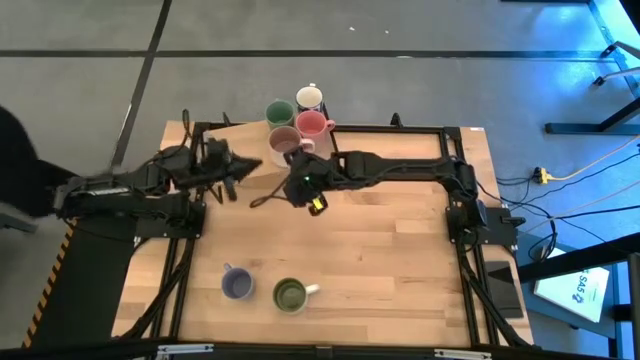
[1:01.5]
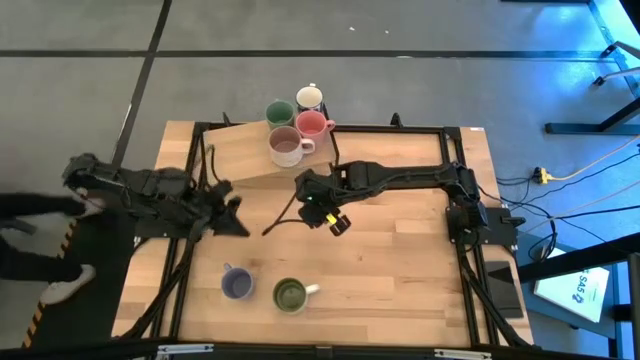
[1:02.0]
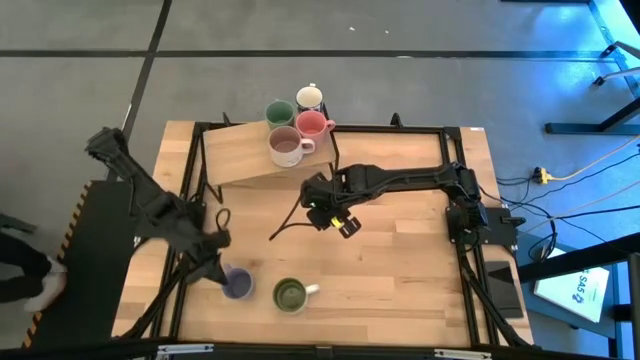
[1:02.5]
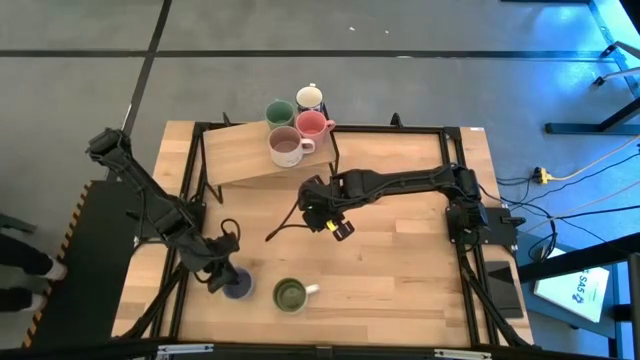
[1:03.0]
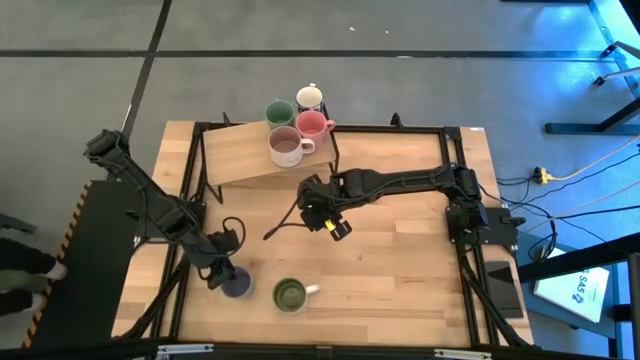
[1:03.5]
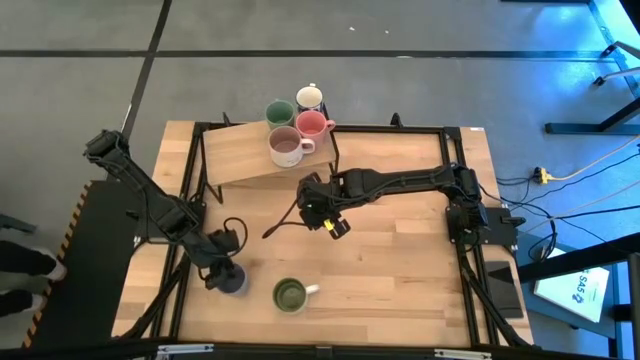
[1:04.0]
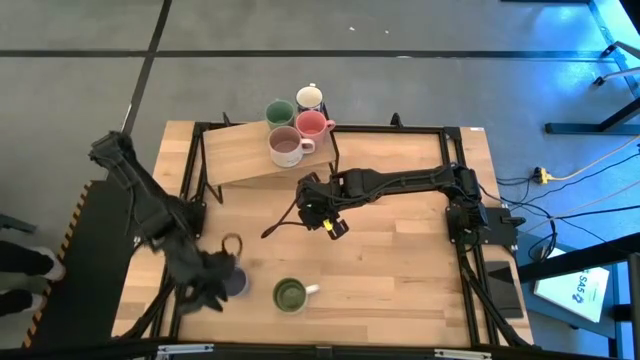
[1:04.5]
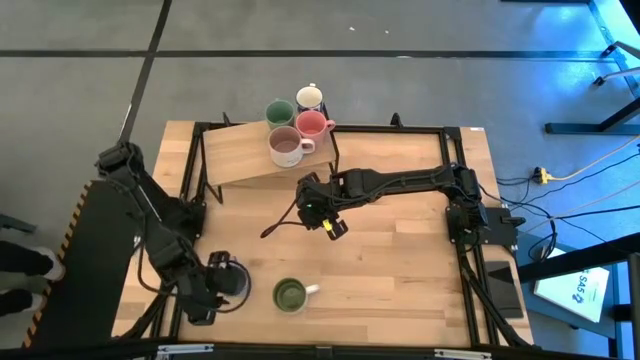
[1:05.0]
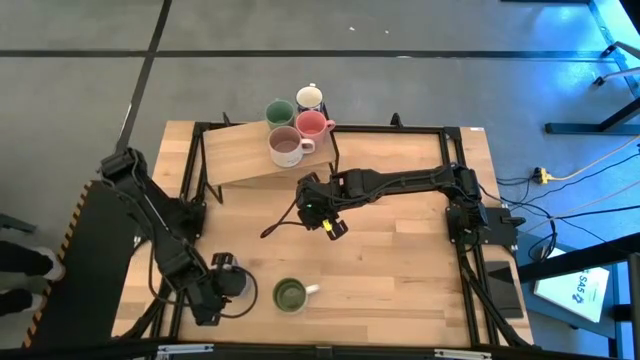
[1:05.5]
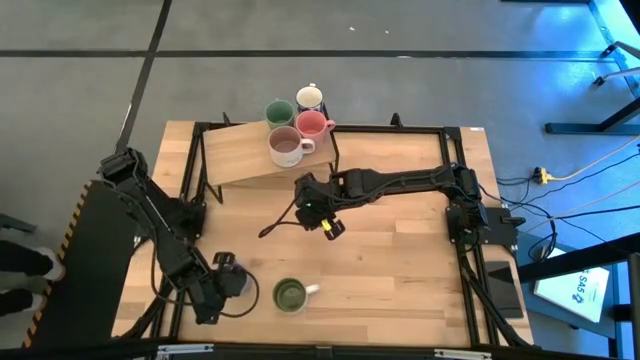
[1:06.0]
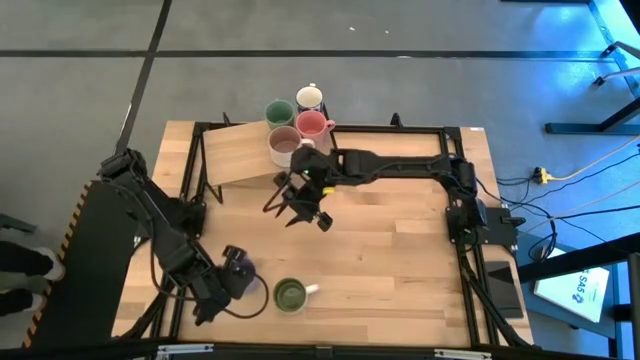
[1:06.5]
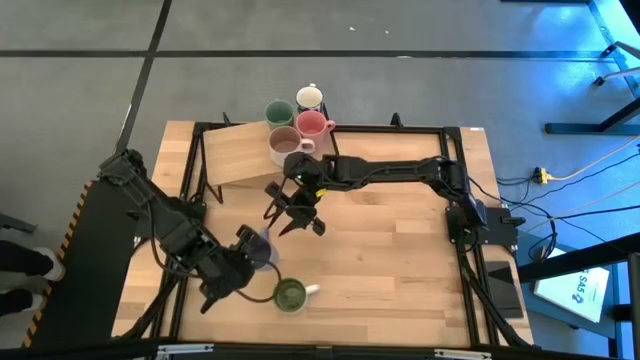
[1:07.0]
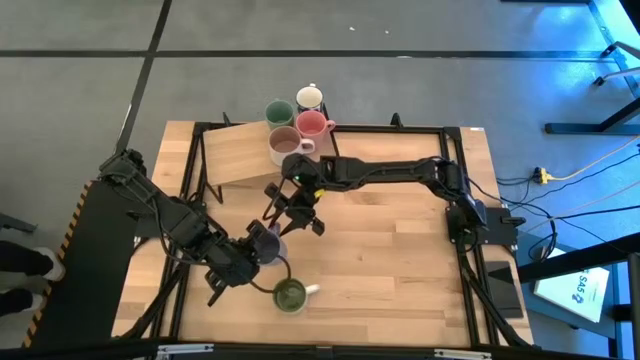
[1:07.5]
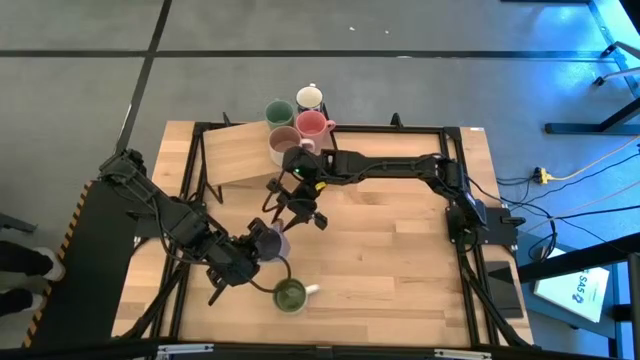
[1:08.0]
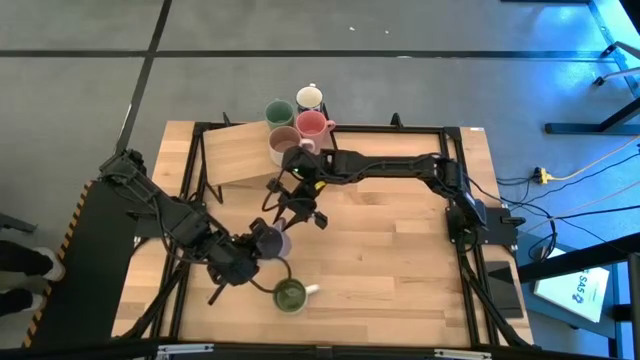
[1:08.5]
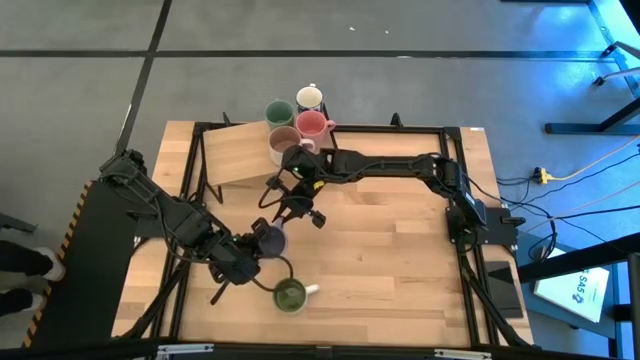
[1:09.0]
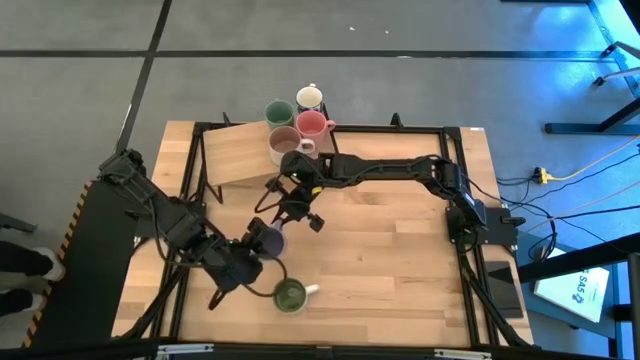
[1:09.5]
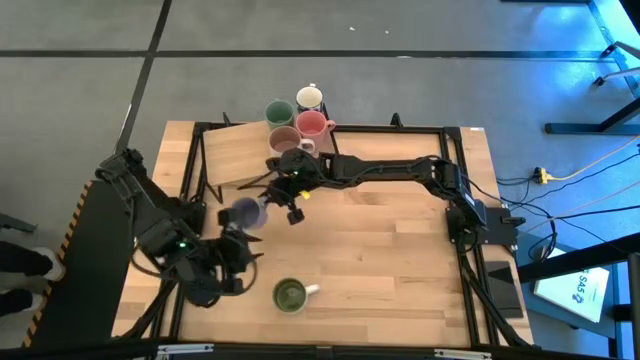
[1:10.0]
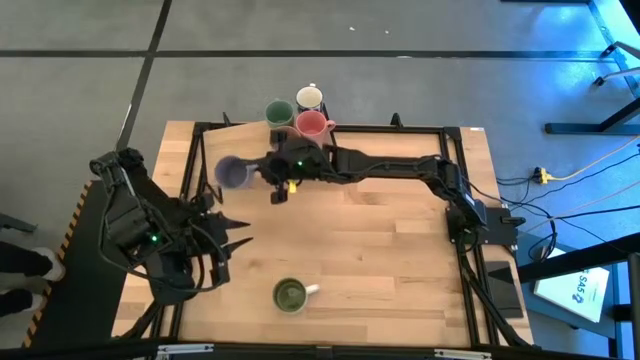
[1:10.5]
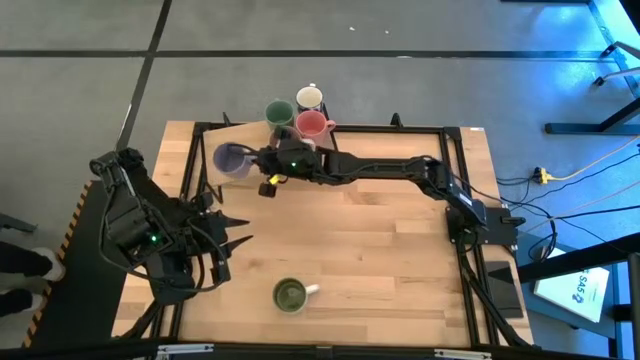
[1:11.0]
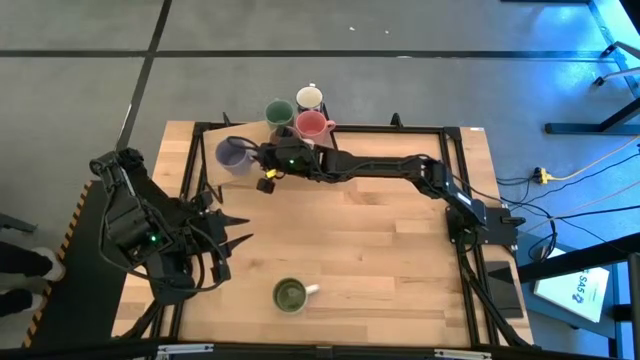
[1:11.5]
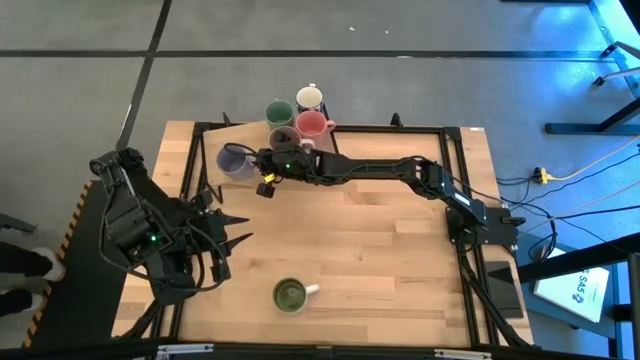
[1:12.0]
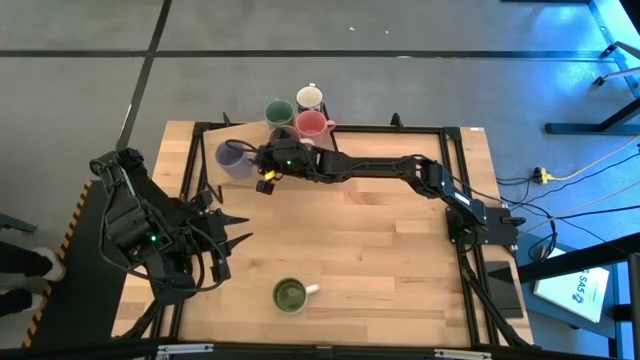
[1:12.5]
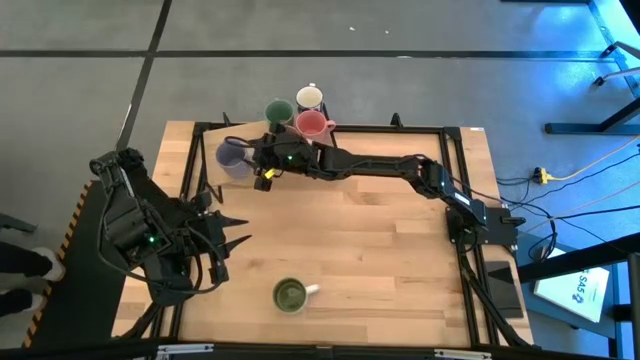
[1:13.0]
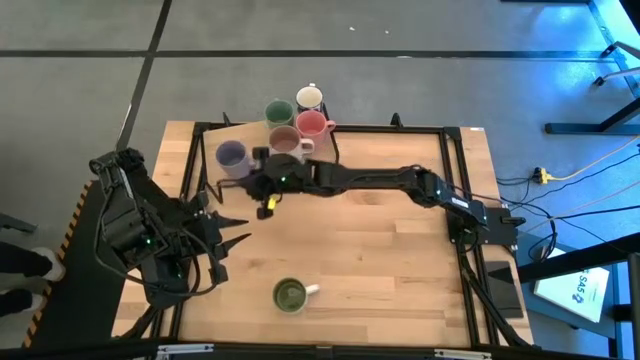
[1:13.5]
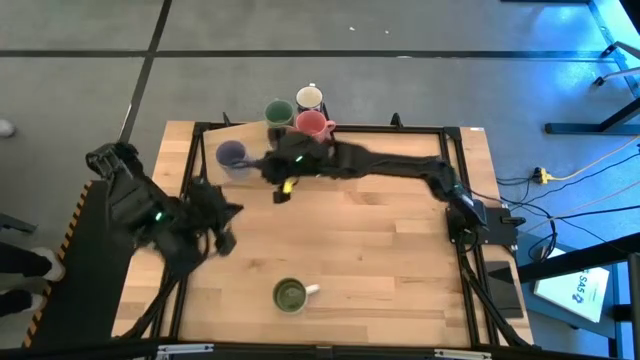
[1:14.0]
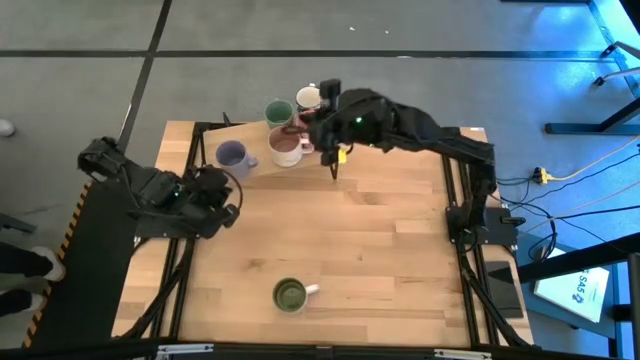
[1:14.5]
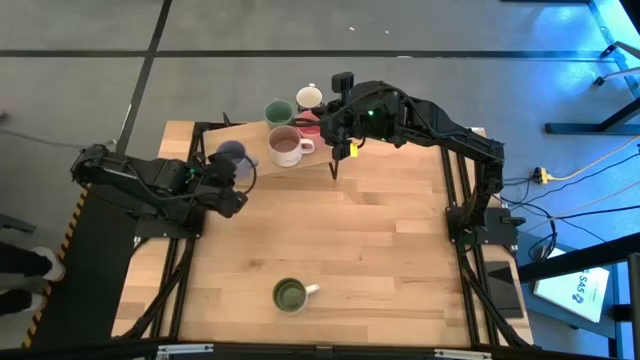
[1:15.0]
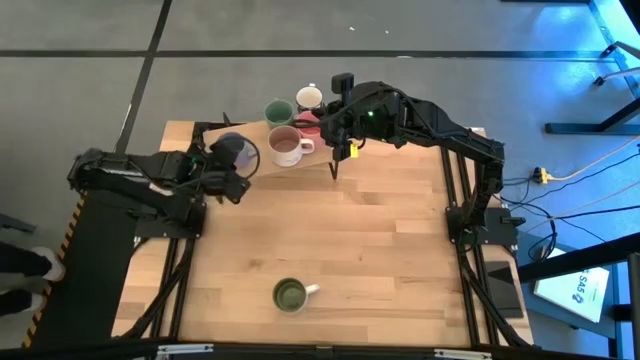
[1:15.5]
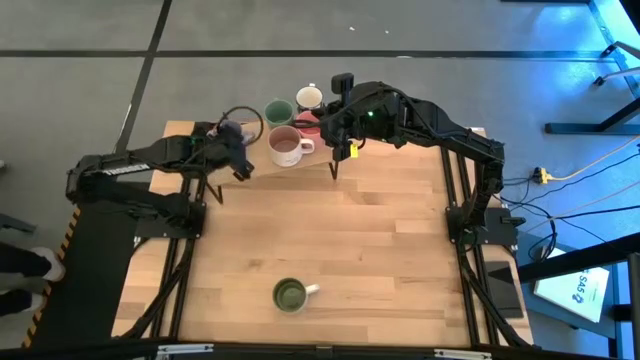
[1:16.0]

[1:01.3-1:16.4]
Task: Place coffee mugs
Put the light purple mug on the shelf

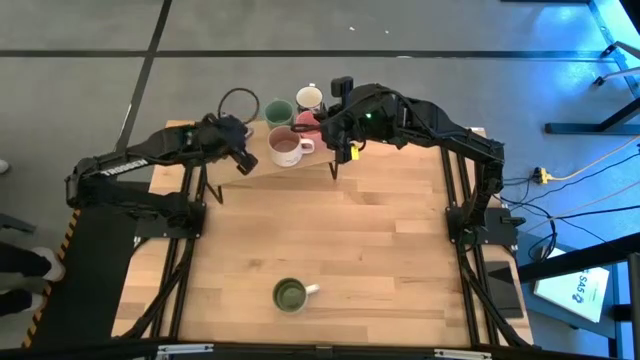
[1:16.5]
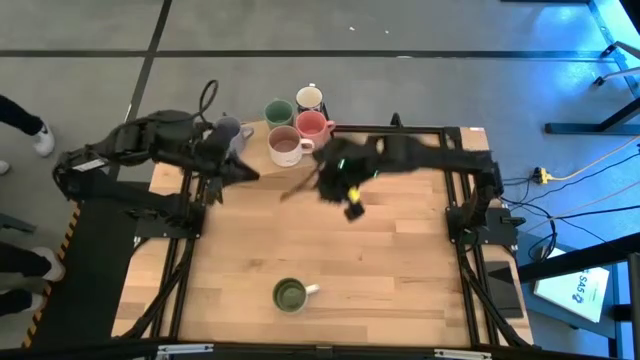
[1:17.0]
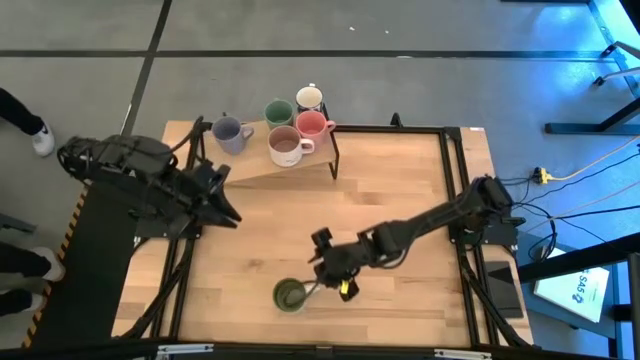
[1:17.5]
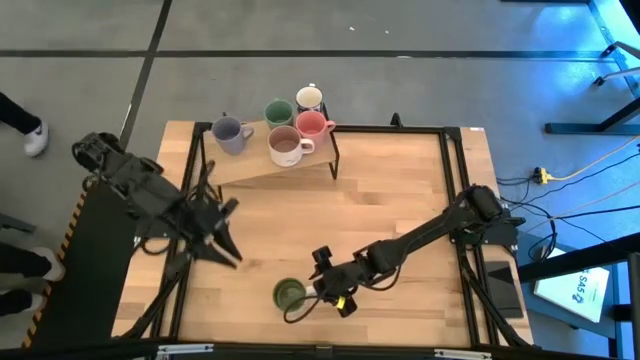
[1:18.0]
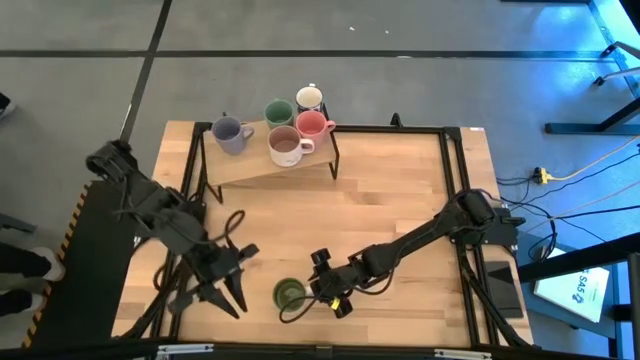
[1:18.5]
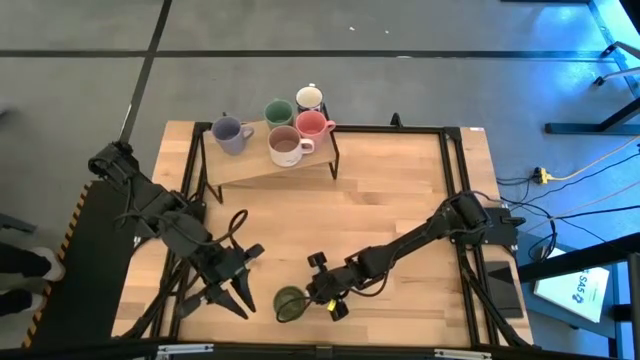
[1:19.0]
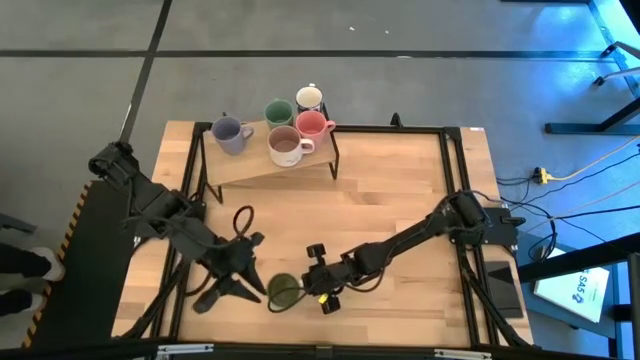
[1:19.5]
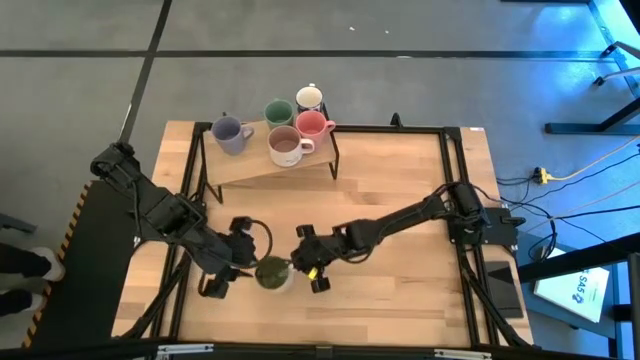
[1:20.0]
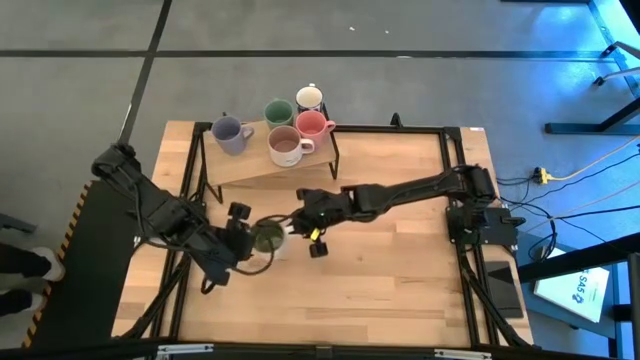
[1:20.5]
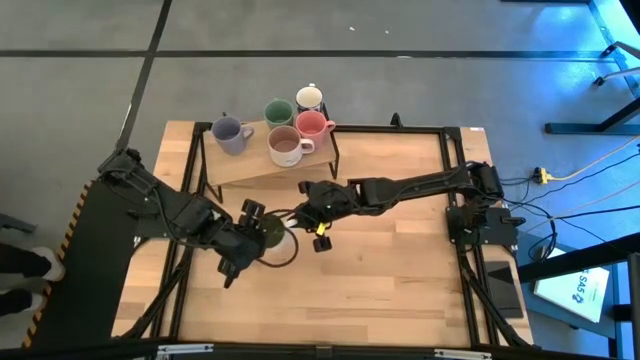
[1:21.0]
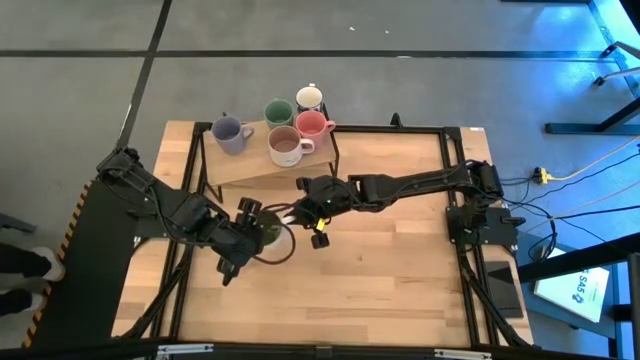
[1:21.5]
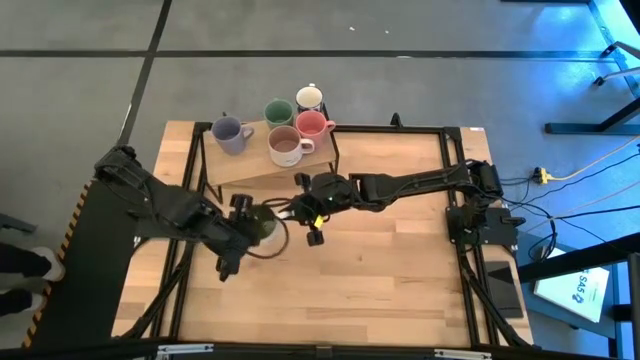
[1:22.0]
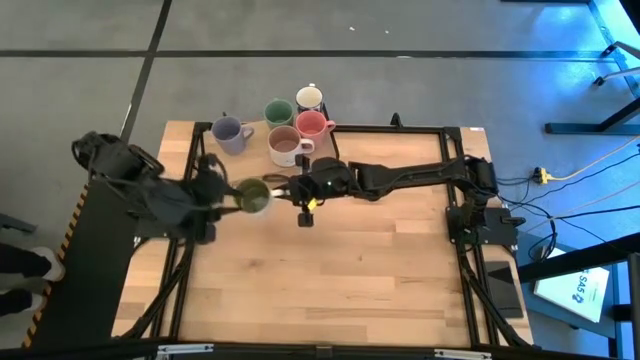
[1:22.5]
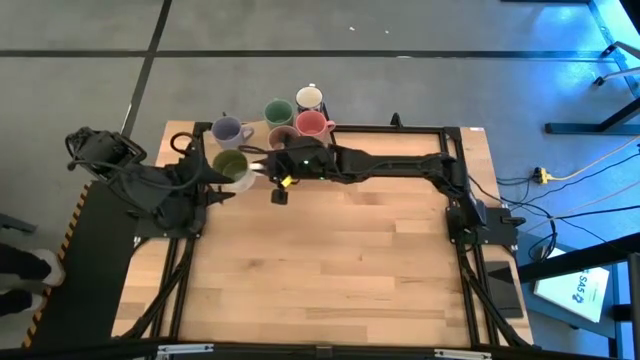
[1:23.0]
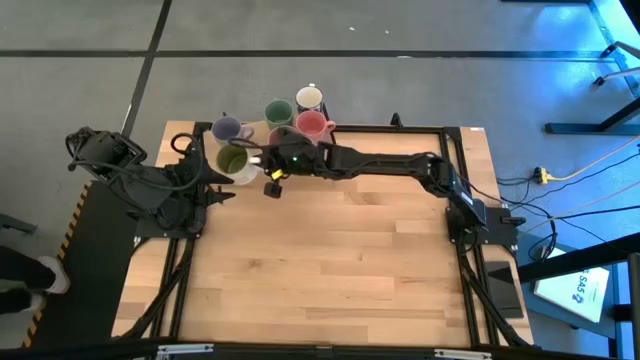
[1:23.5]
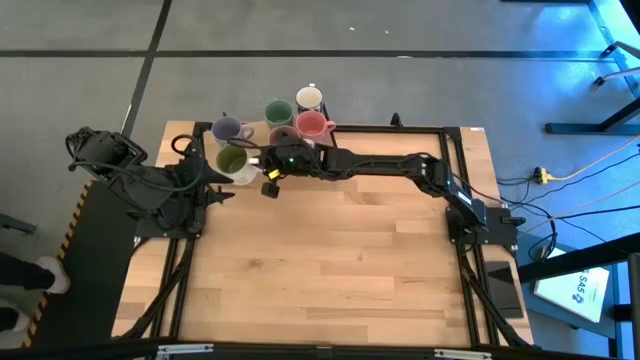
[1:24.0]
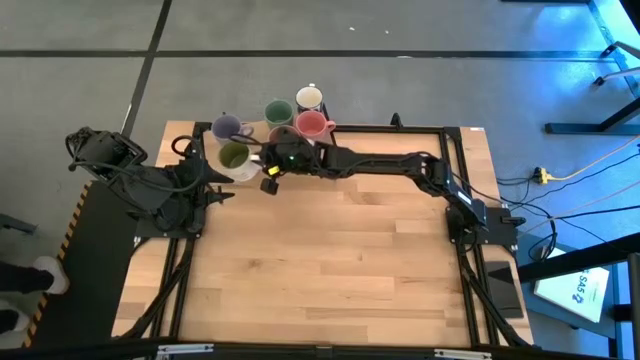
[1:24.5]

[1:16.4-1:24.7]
Put the white mug on the shelf
